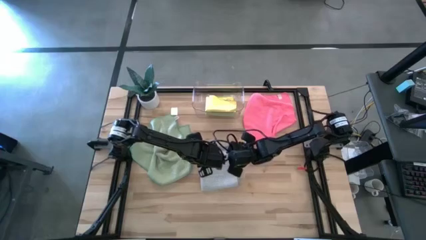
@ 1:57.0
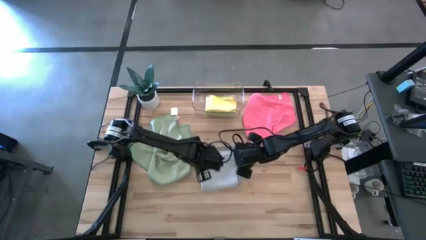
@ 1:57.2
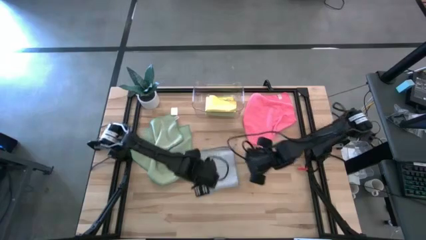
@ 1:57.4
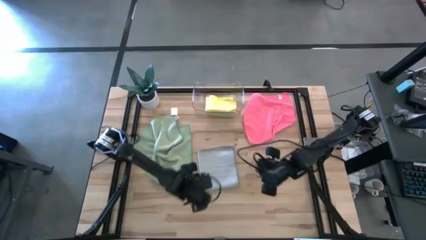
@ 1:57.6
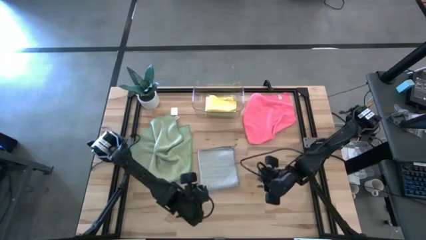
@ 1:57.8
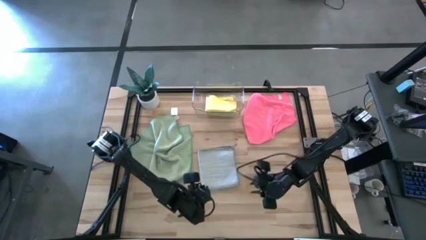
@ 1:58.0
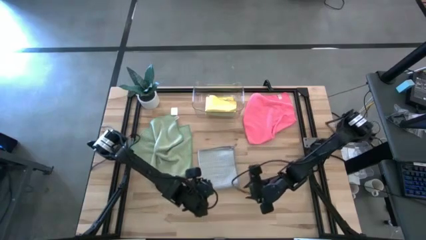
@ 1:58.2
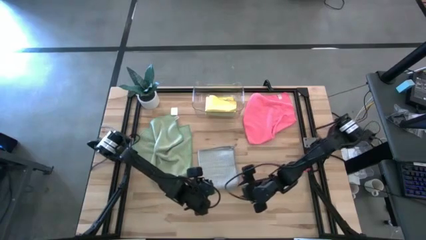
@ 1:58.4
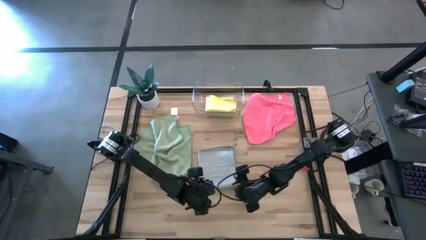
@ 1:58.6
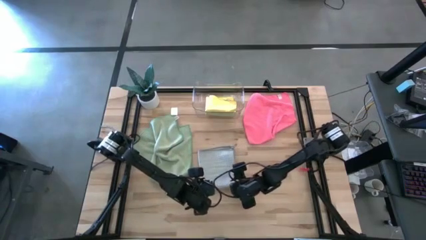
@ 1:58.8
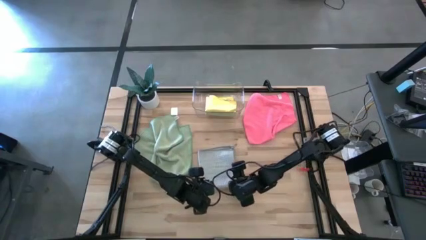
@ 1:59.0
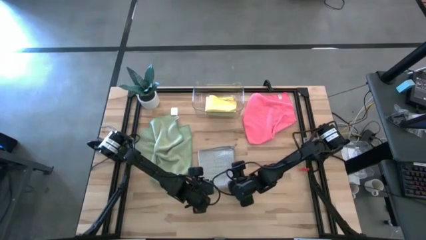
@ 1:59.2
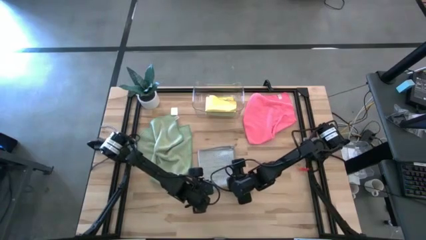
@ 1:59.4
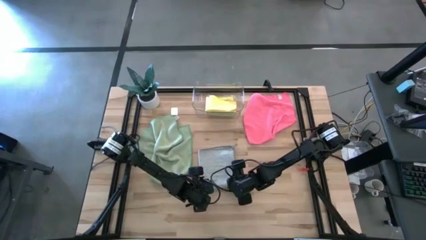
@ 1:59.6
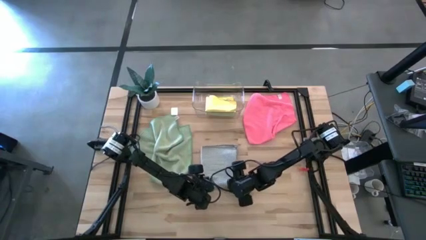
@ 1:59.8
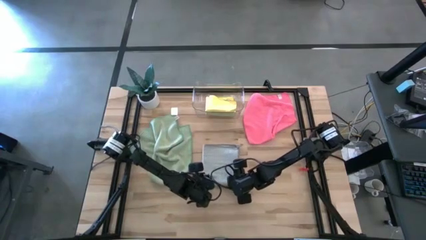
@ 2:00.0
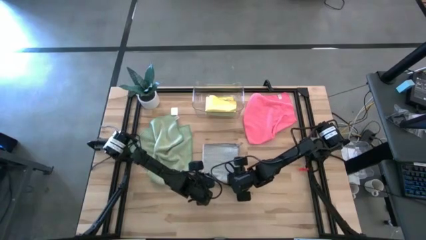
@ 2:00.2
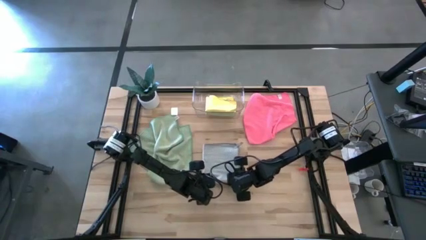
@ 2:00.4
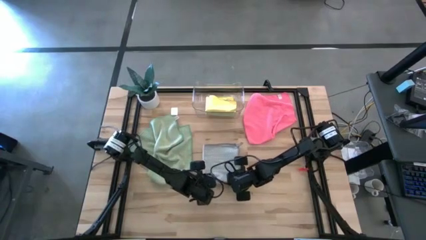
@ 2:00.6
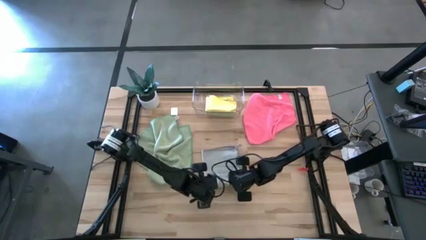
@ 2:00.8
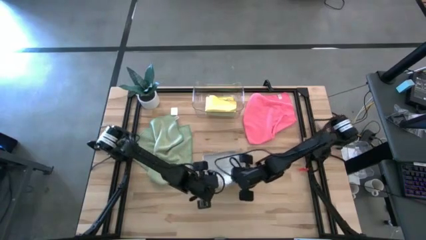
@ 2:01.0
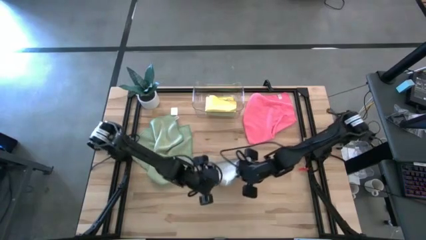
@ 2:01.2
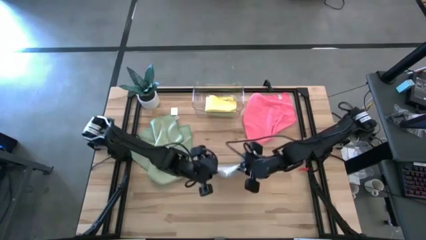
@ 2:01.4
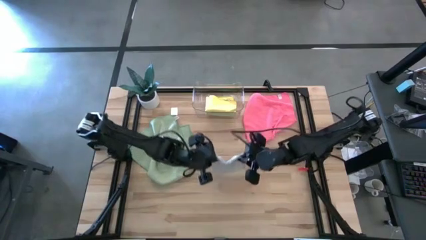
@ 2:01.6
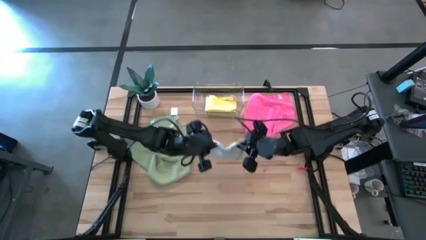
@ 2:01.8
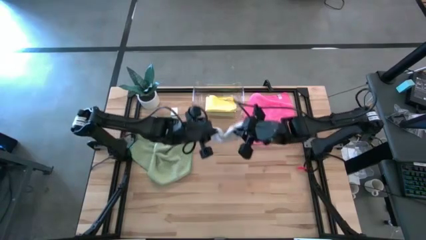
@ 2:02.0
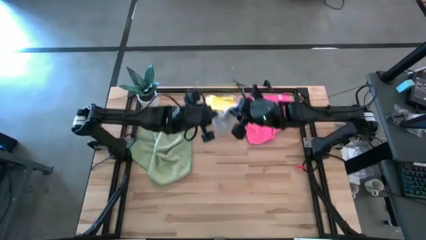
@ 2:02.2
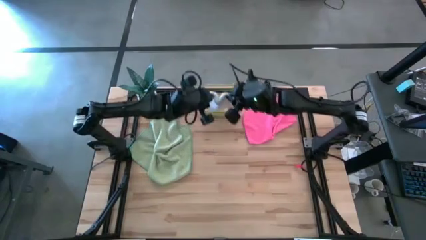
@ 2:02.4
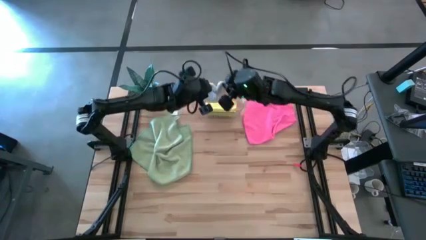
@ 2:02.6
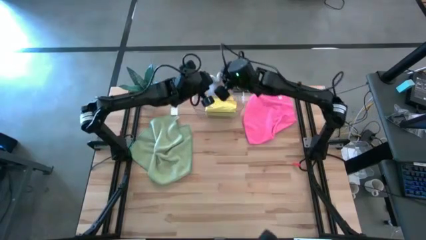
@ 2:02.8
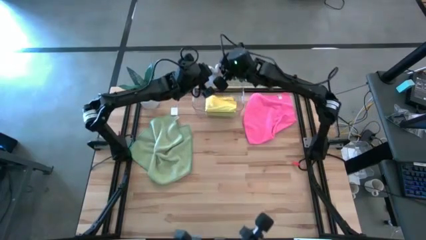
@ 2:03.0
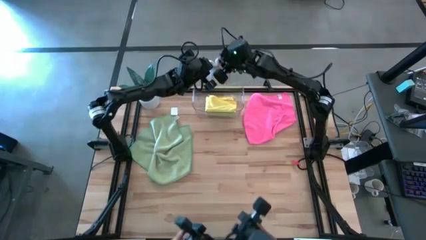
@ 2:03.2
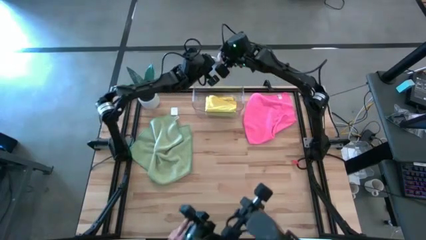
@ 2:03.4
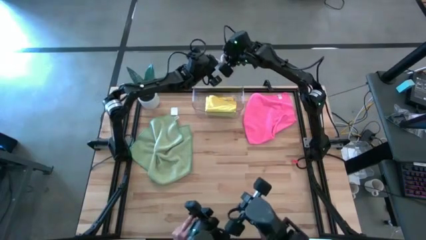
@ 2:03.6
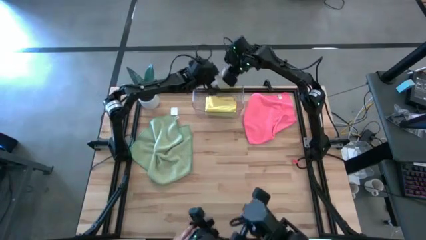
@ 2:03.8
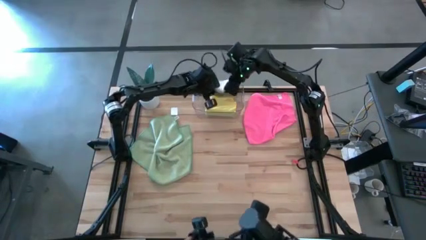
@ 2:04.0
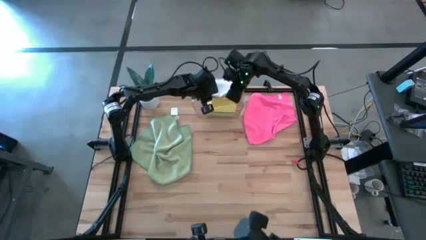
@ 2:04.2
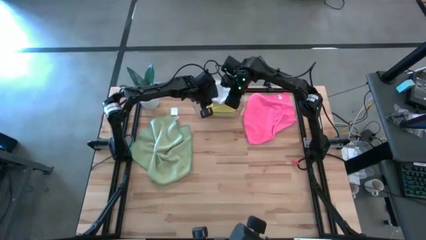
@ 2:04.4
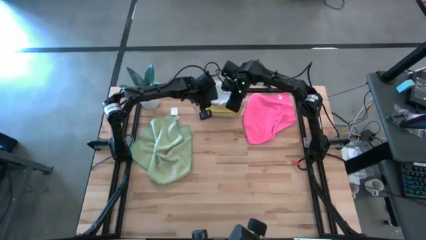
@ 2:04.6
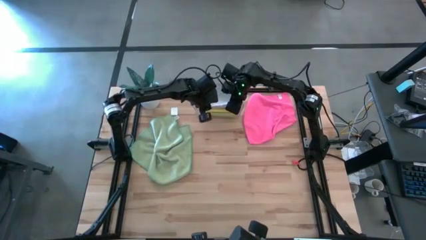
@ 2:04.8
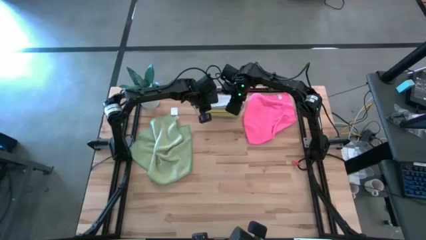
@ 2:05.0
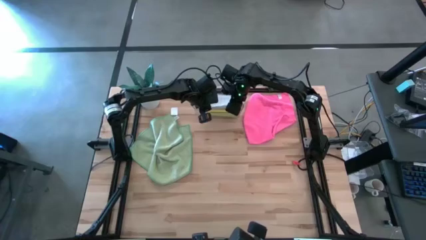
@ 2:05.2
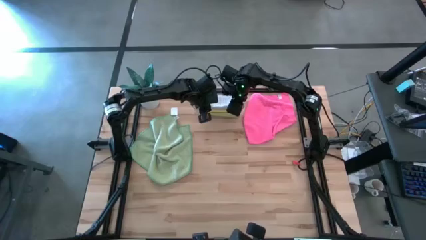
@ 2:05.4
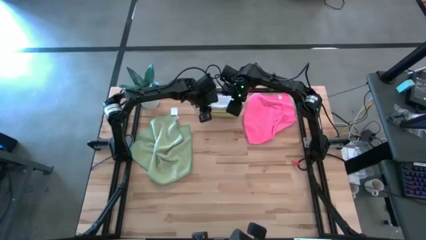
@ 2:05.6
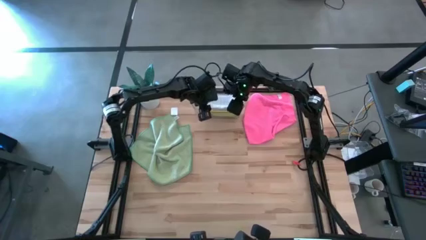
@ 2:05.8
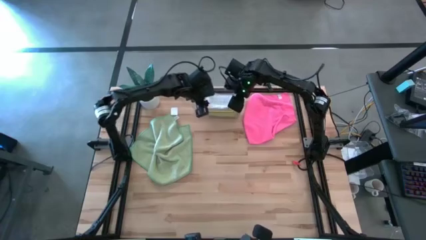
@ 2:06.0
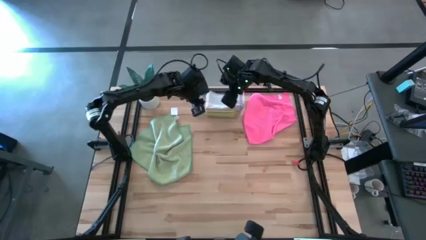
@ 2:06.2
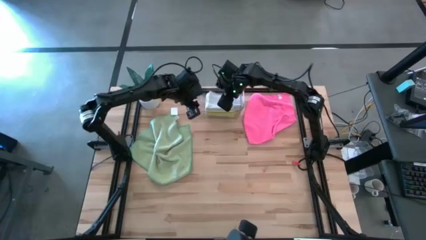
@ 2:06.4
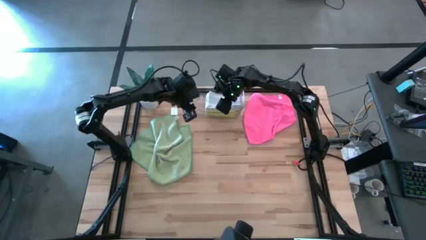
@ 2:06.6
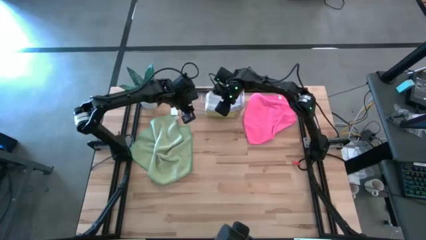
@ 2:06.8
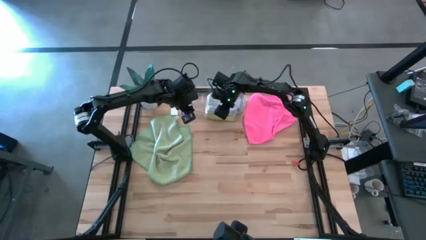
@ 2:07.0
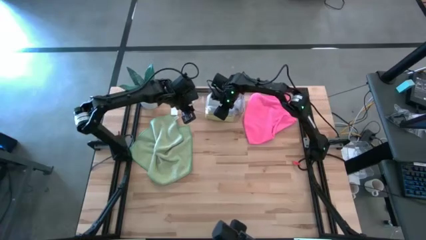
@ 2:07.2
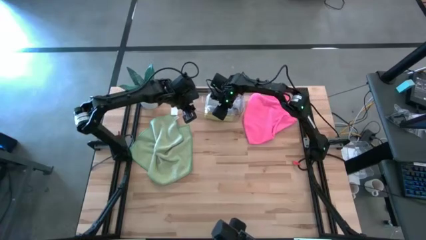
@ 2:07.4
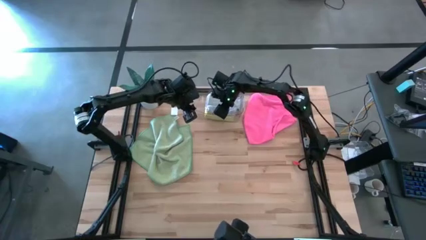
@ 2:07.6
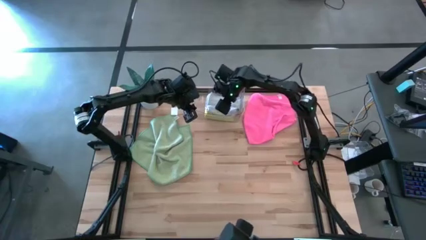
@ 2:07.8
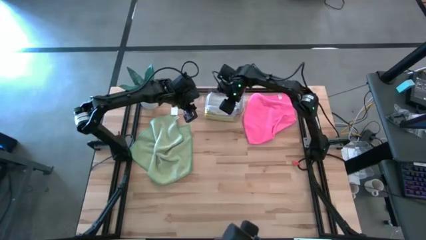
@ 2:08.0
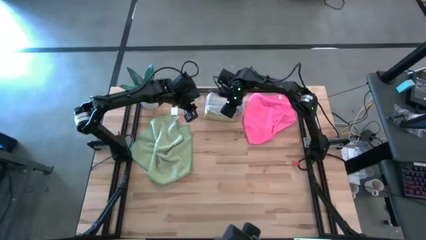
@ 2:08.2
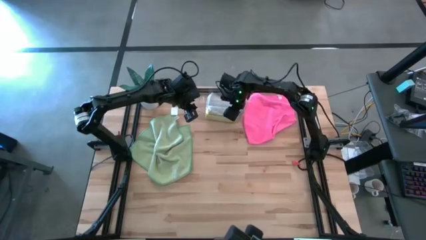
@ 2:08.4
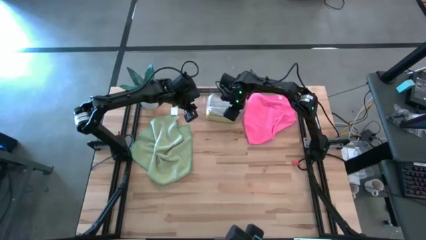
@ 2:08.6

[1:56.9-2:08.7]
Task: Fold microfiber towels
Put the folded gray microfiber cloth into the transparent bin

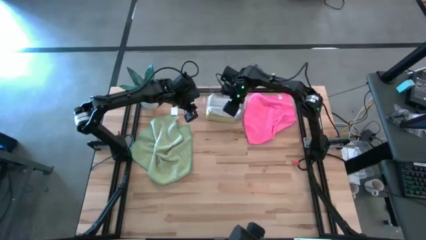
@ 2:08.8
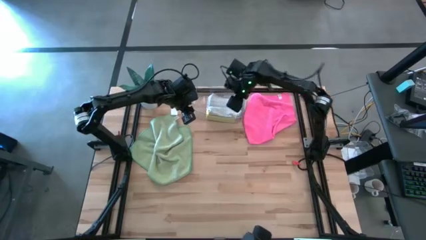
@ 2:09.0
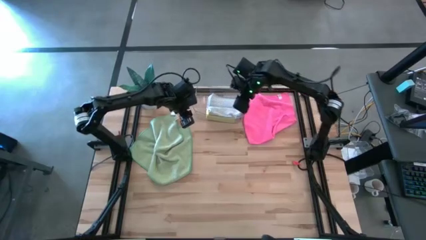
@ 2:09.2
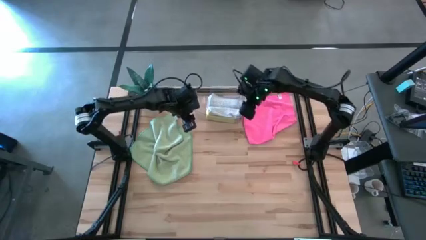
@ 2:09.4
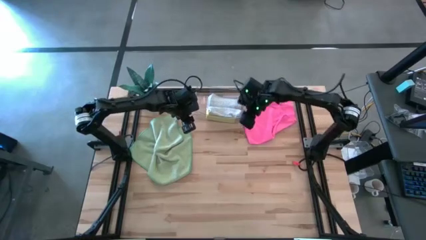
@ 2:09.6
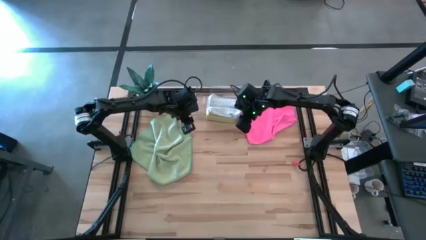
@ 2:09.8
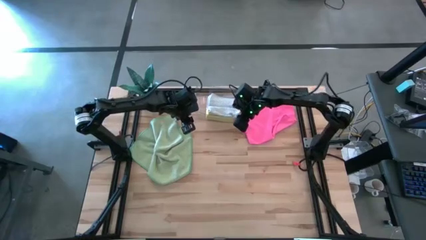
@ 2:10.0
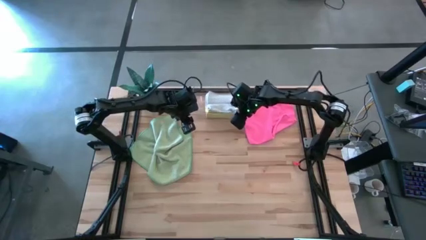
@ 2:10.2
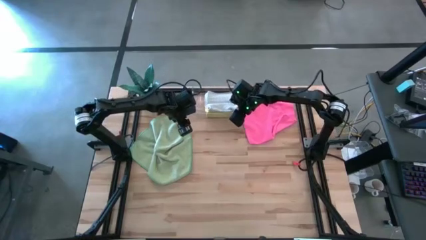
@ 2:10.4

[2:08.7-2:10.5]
Adjust the transparent bin

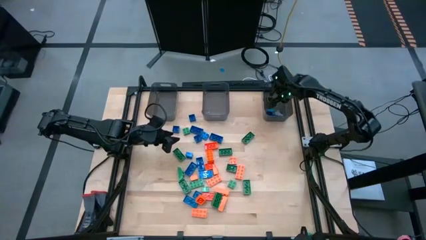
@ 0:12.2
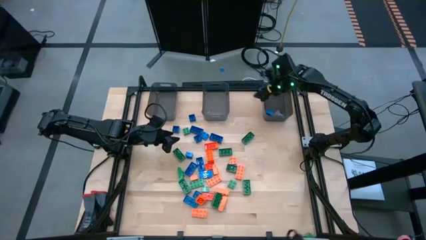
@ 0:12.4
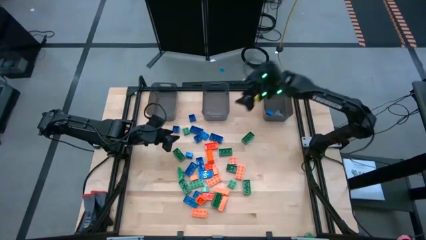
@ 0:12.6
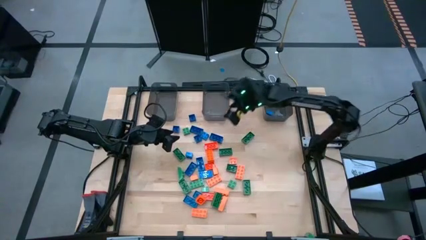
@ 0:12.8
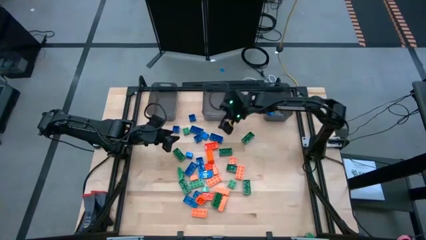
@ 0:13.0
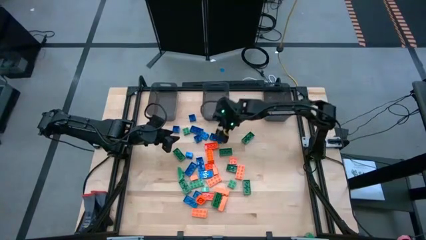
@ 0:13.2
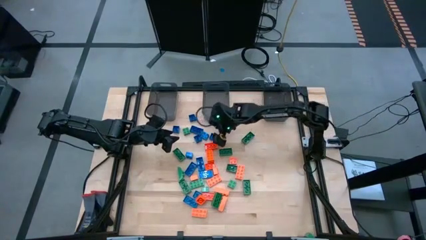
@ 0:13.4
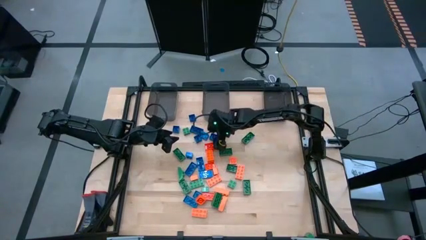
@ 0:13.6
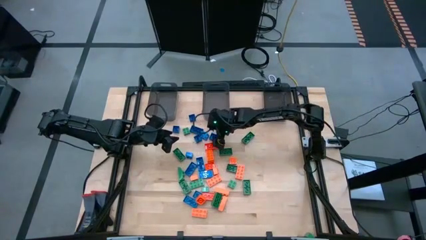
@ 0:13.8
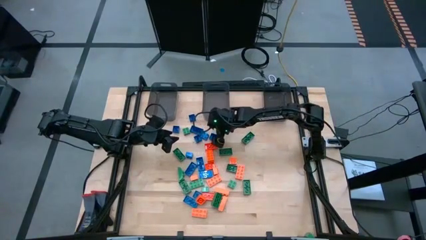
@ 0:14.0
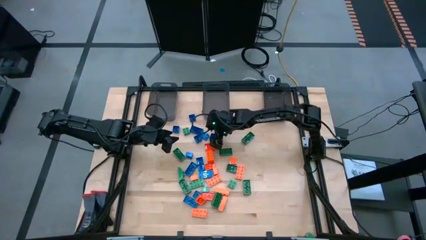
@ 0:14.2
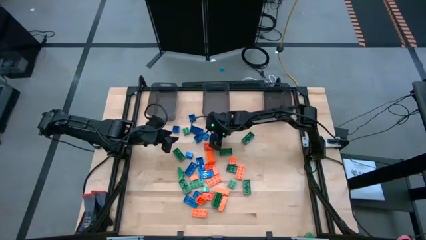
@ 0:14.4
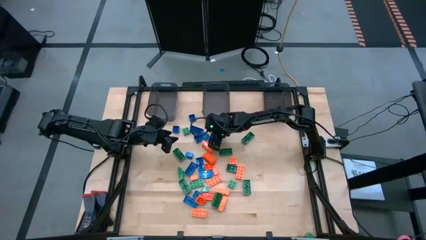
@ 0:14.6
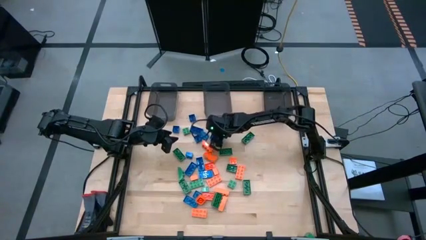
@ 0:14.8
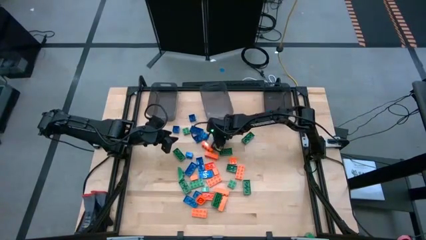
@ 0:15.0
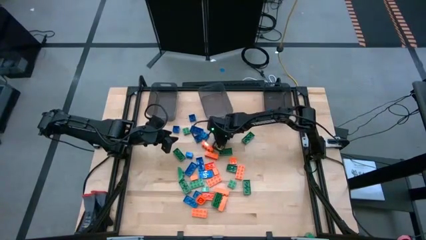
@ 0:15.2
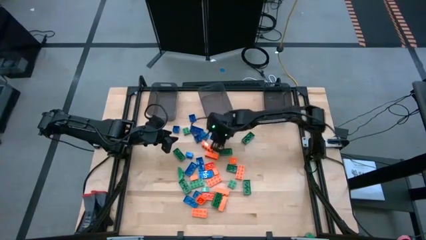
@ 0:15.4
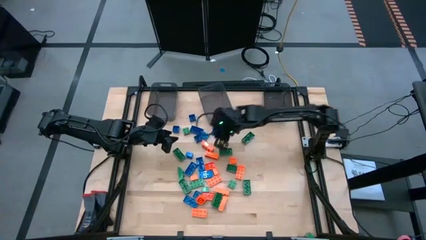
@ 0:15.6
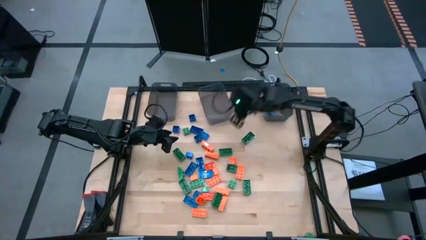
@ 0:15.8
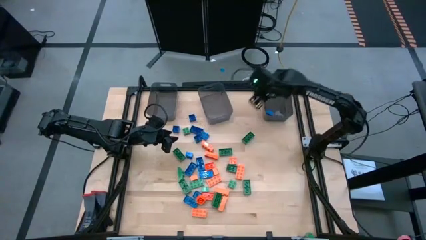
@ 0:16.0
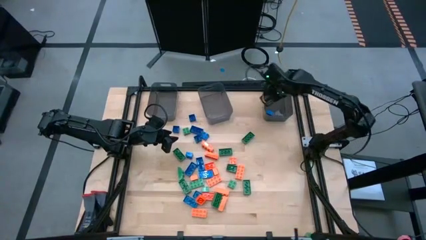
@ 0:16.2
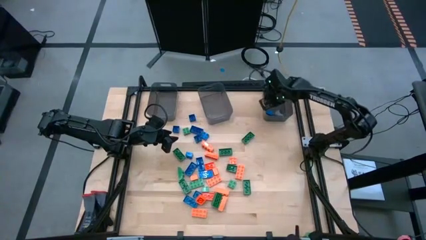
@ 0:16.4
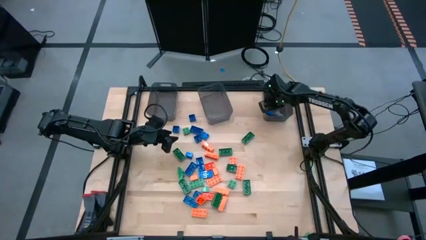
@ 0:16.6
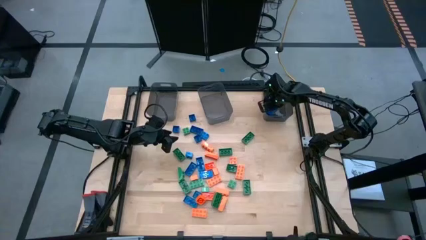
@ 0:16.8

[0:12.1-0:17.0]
Task: Sort blocks
Put the blue game piece into the right black bin
